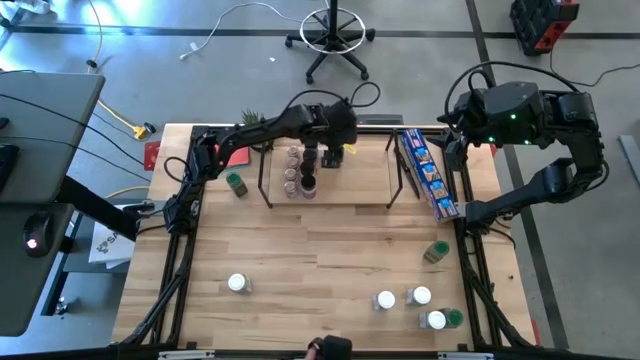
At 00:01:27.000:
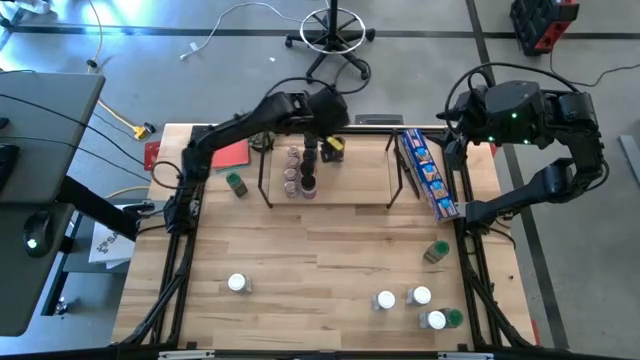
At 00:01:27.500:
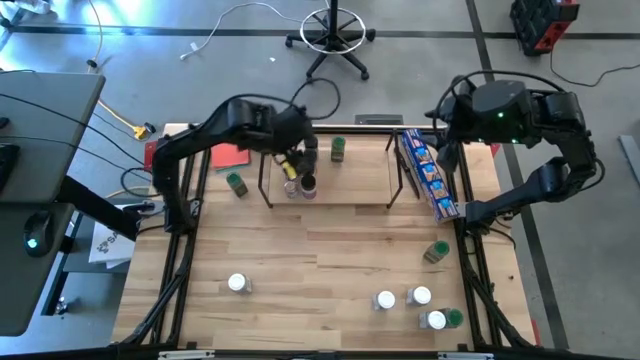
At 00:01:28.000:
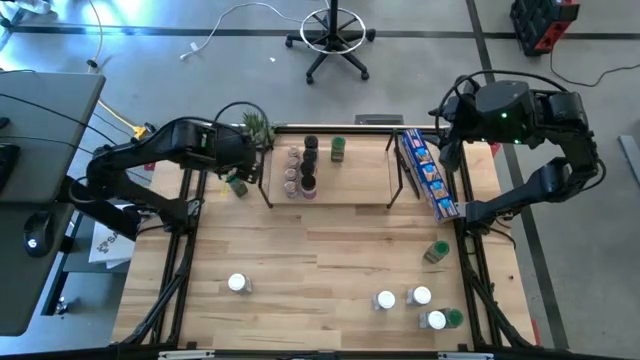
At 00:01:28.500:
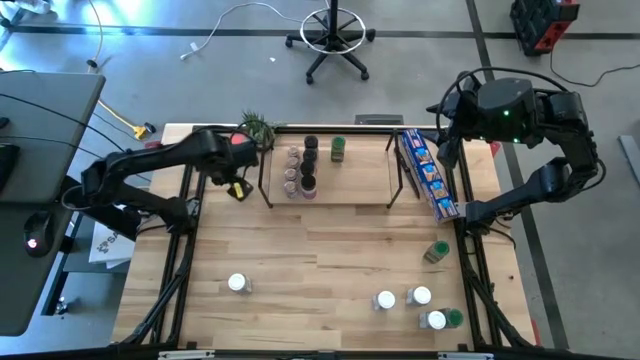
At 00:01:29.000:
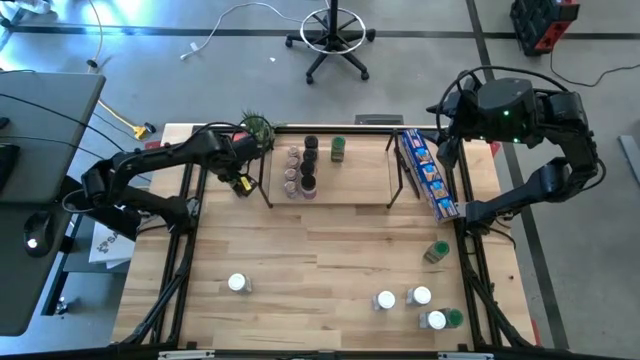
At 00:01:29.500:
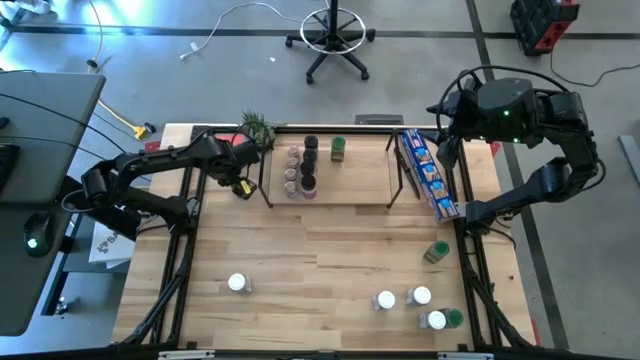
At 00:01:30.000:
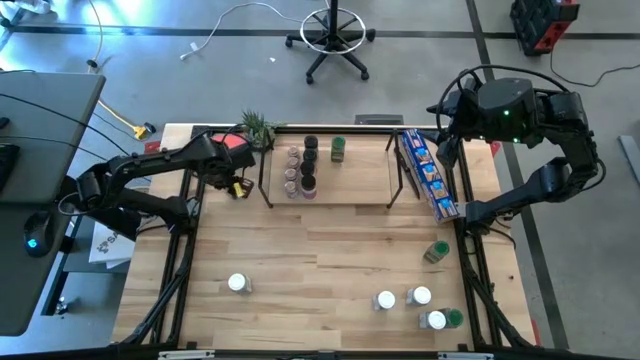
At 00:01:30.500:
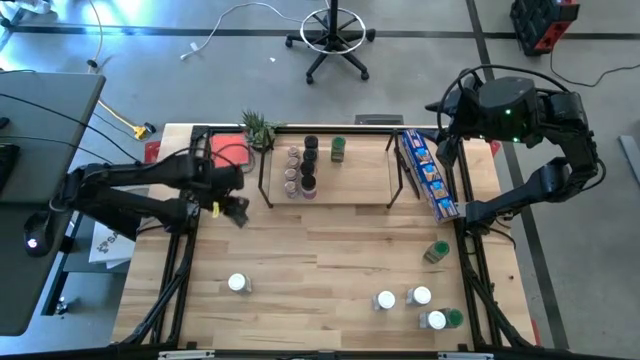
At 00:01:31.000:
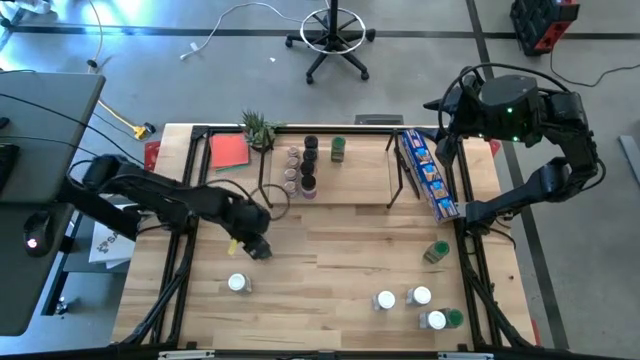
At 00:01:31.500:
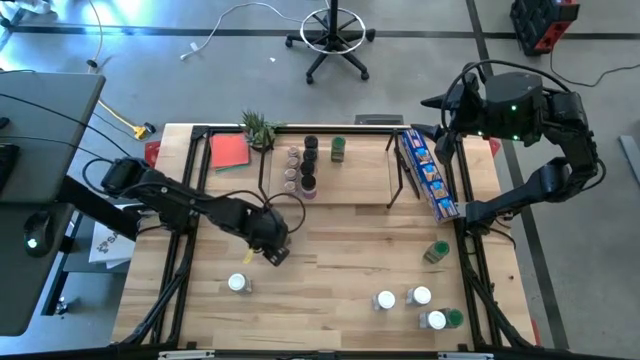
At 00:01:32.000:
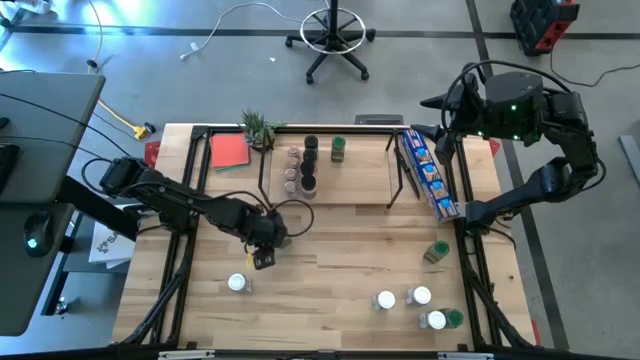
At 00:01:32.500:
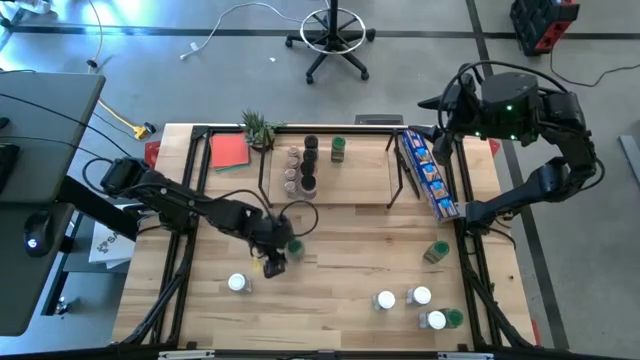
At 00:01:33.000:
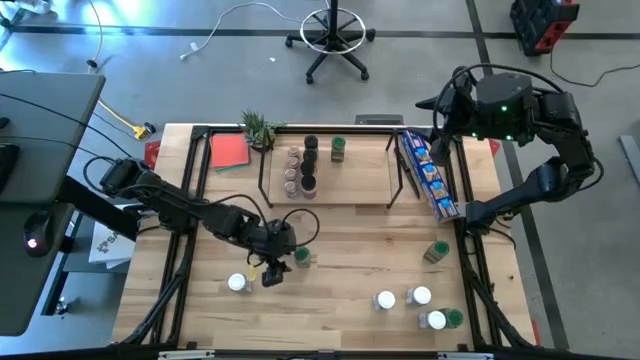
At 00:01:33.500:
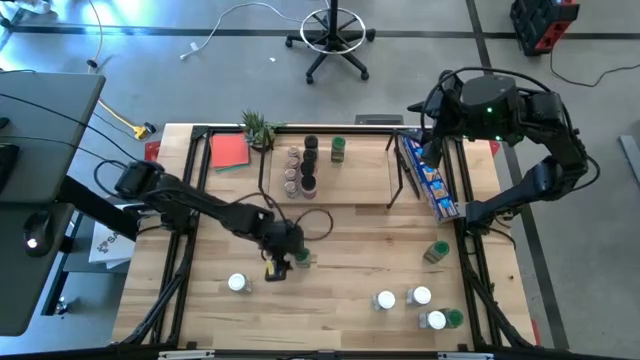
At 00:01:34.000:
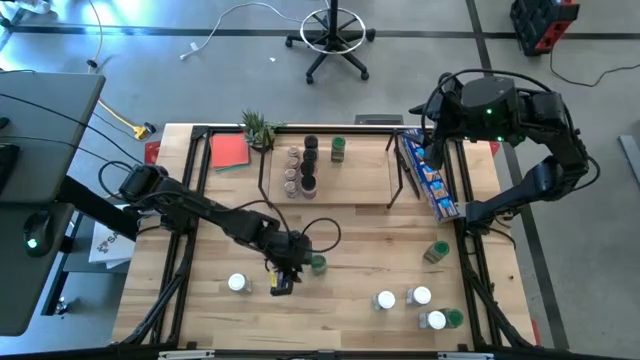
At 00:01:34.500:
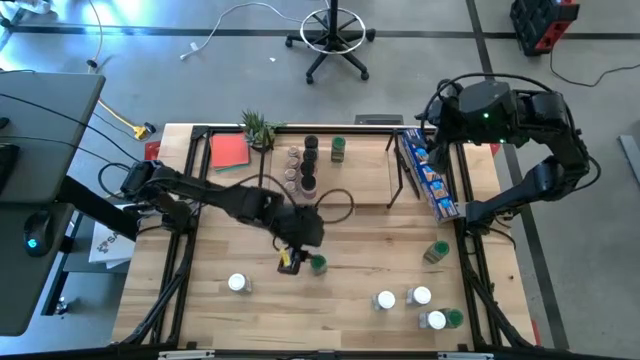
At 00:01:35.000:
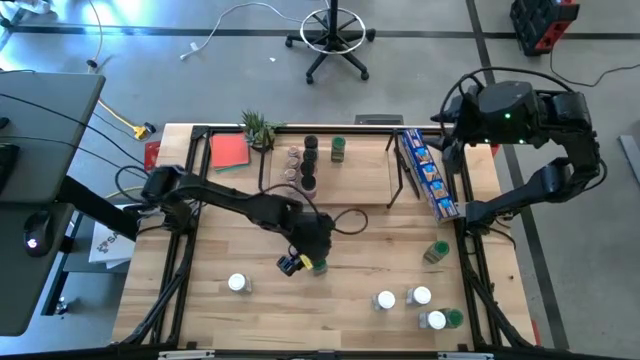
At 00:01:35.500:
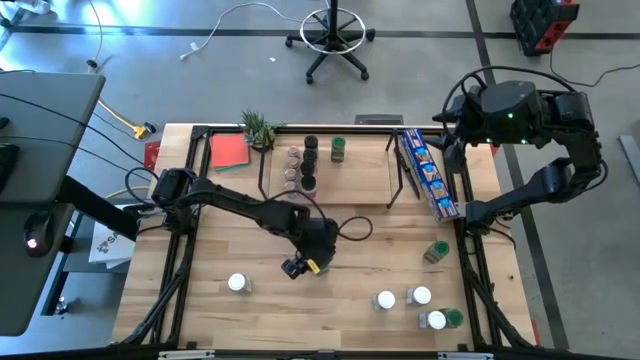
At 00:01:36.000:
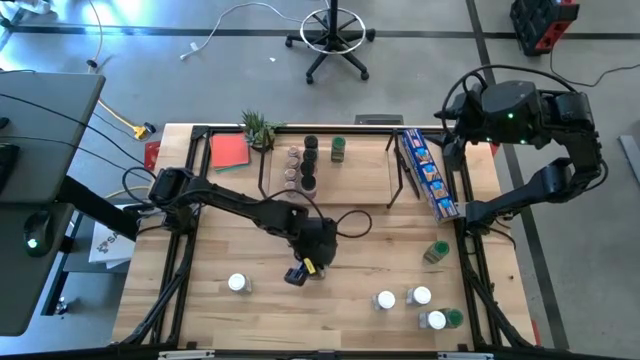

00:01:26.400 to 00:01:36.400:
Task: Shelf spices
Put the green seasoning bottle aligned with the other green seasoning bottle on the shelf

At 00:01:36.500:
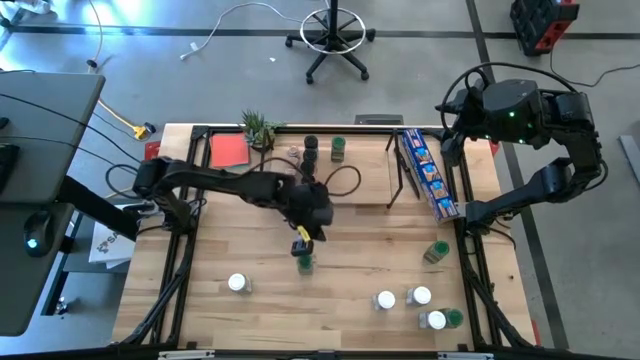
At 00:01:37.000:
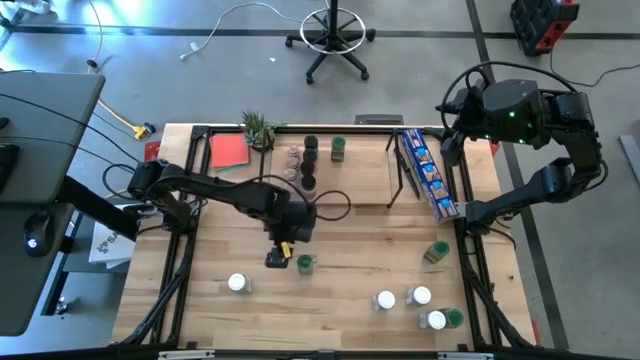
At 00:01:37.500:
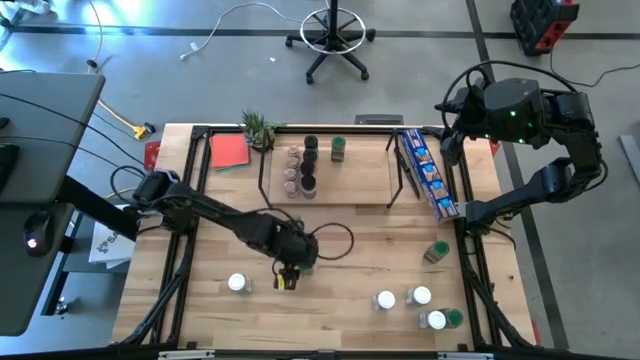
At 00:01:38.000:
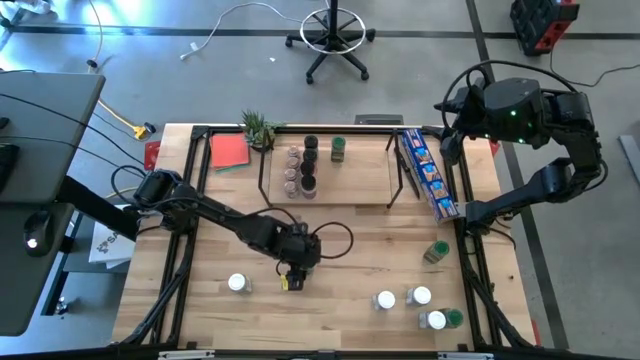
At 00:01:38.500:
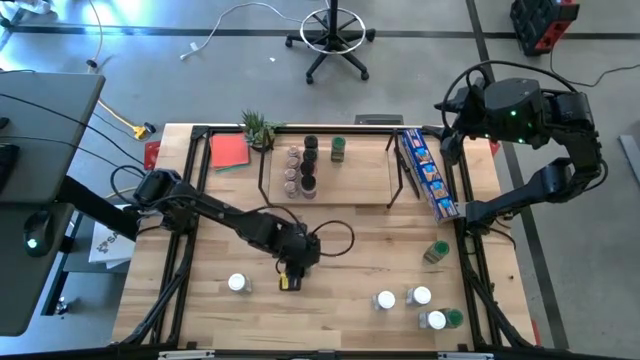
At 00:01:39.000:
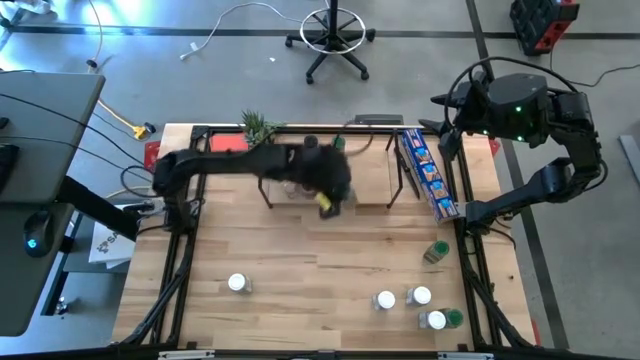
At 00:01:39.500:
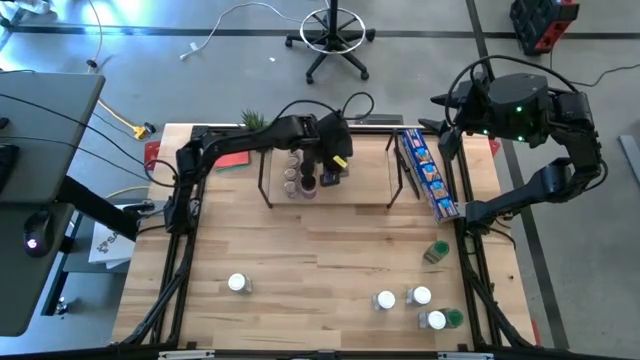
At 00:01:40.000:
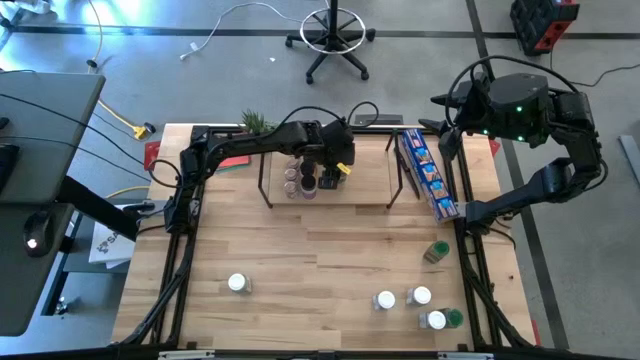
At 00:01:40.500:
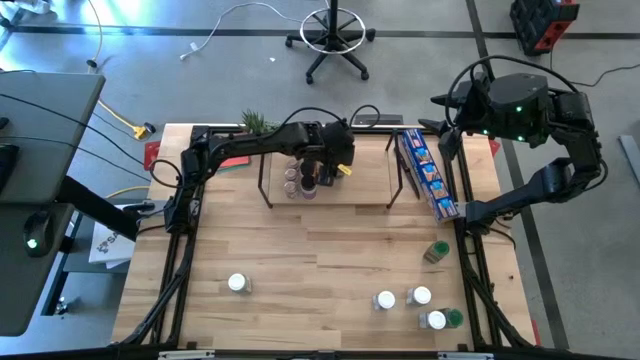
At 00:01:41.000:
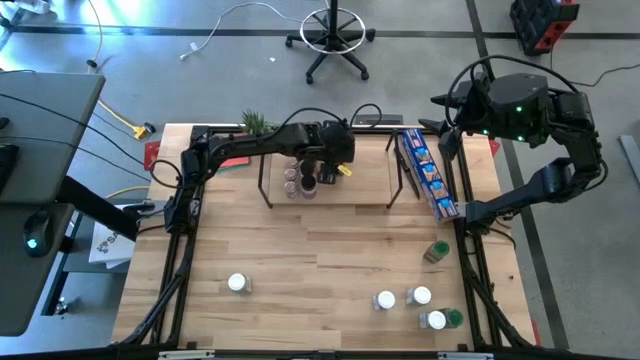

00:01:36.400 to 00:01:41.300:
Put the green seasoning bottle aligned with the other green seasoning bottle on the shelf

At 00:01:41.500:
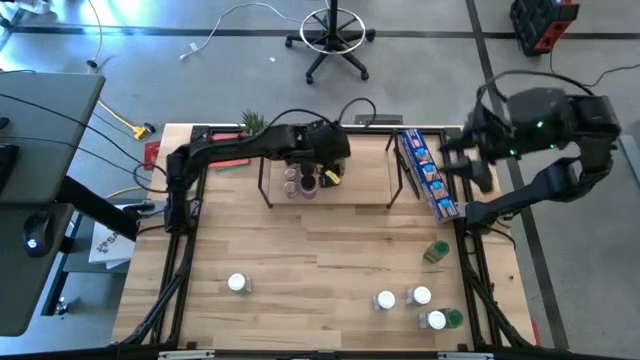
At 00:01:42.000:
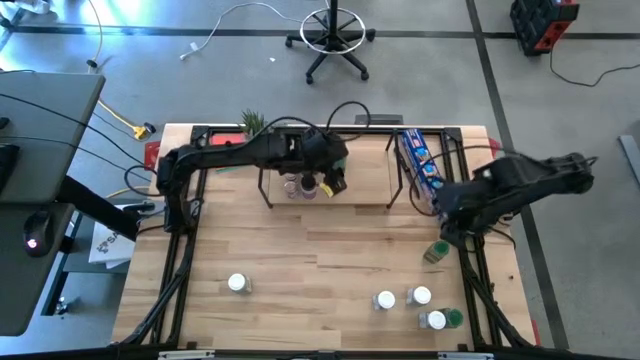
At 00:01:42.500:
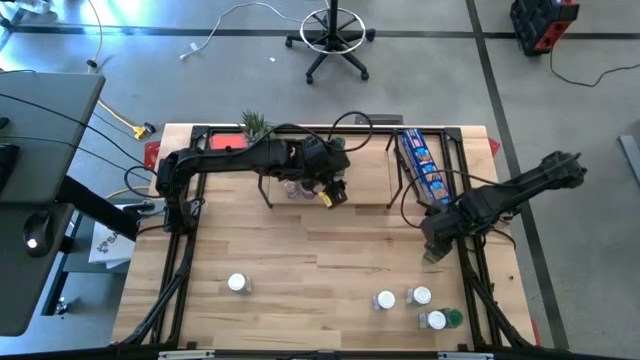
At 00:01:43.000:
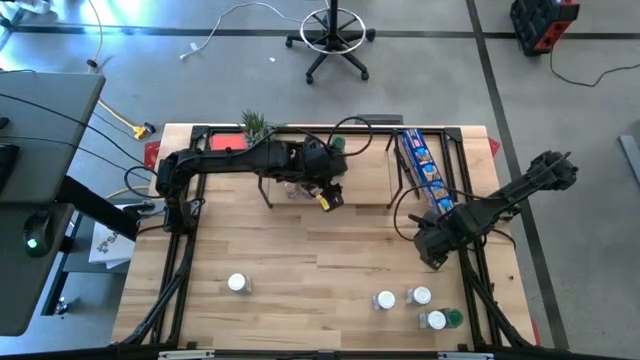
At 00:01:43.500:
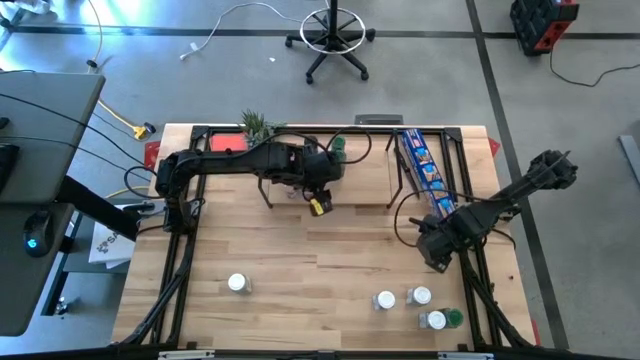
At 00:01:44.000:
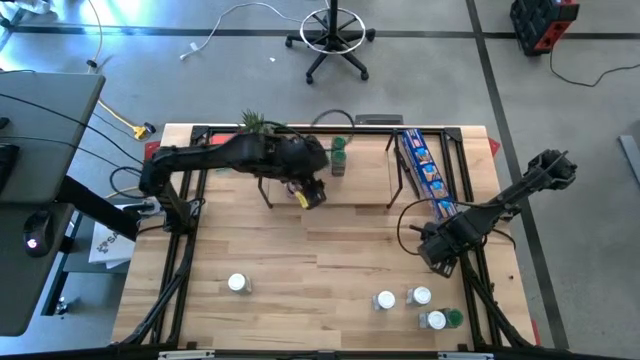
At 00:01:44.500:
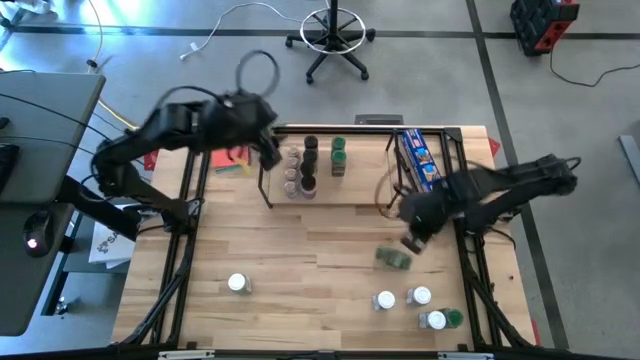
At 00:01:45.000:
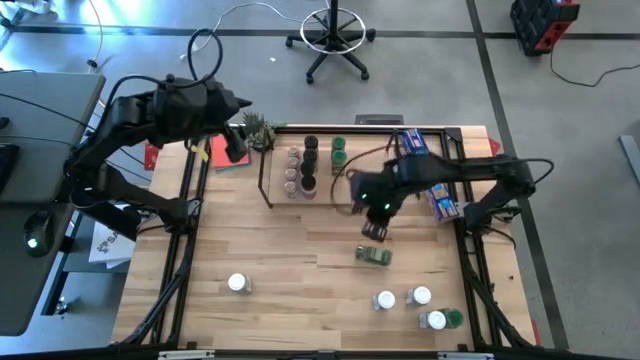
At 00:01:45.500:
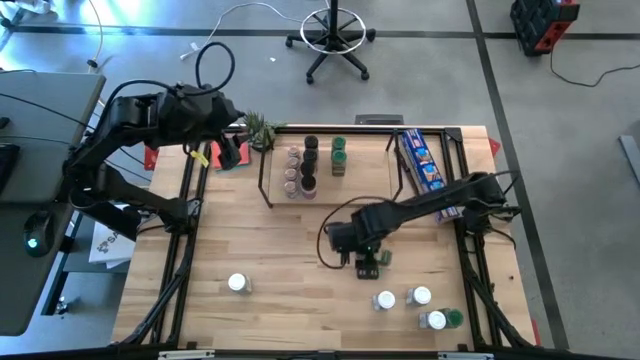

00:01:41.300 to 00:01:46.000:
Put the green seasoning bottle aligned with the other green seasoning bottles on the shelf

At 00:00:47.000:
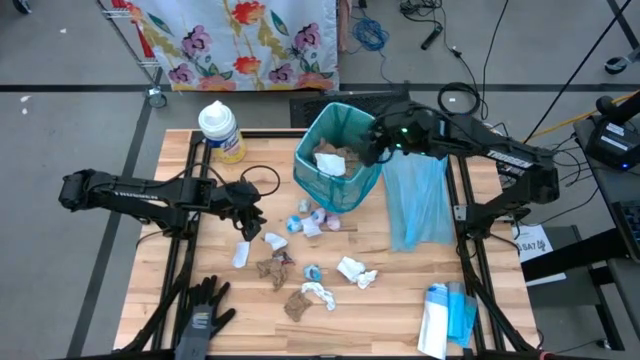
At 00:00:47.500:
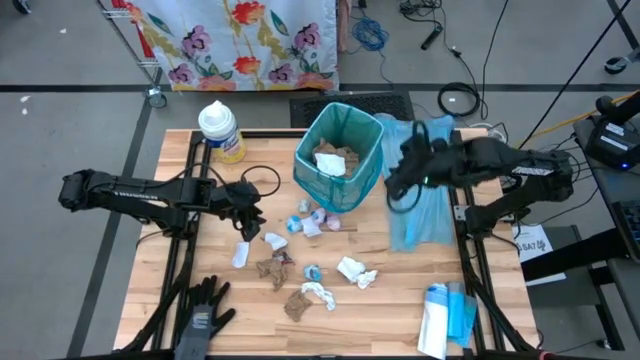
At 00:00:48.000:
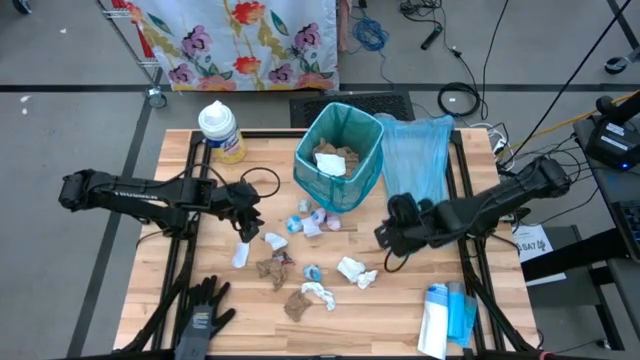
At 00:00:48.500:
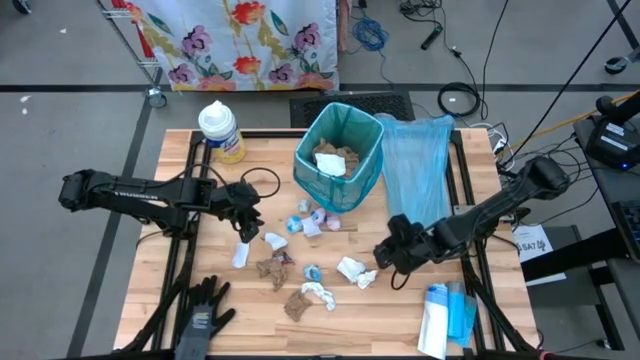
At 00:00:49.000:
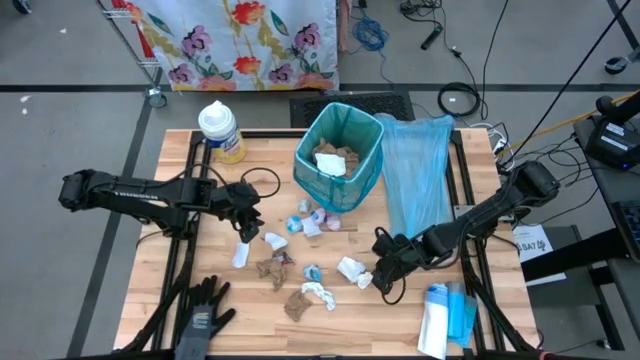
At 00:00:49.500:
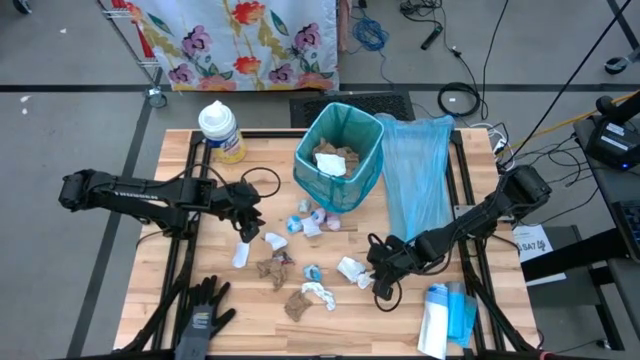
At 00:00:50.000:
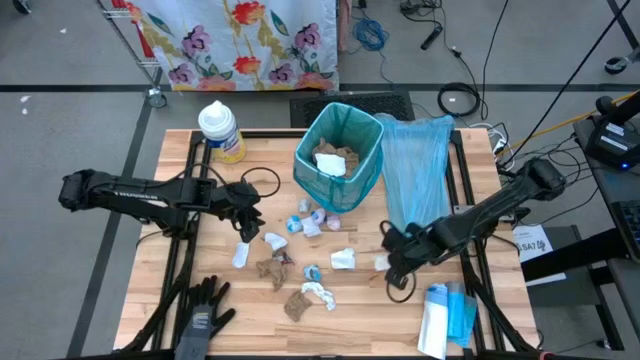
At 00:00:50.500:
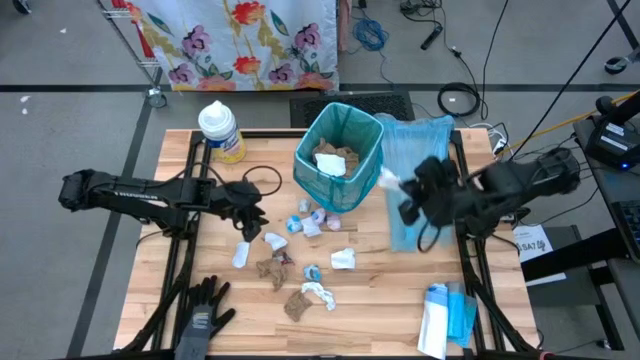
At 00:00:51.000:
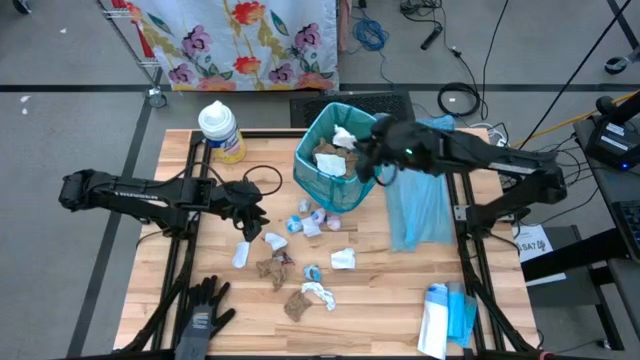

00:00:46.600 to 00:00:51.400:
Task: place trash/remove bag and relplace
Put the top white napkin into the trash bin
